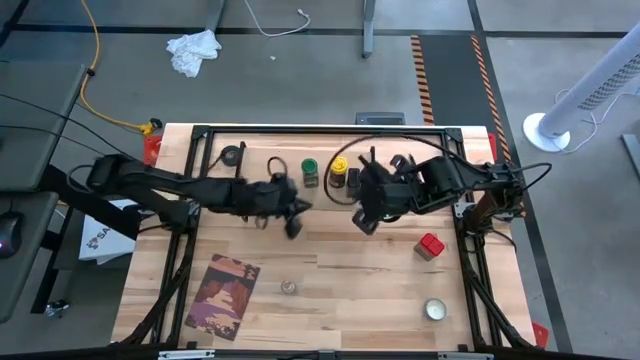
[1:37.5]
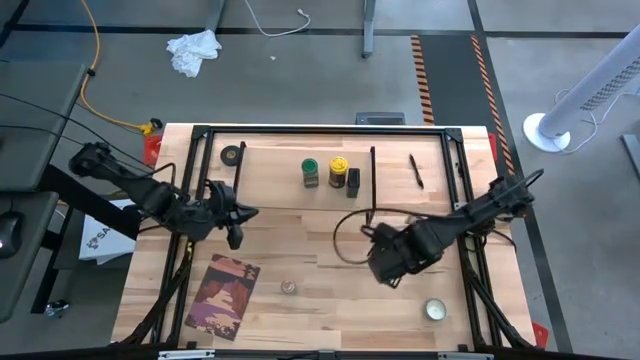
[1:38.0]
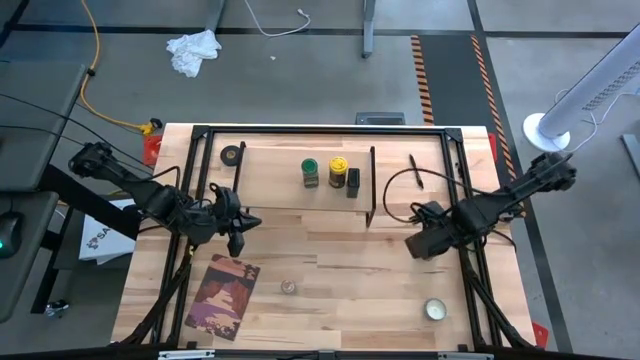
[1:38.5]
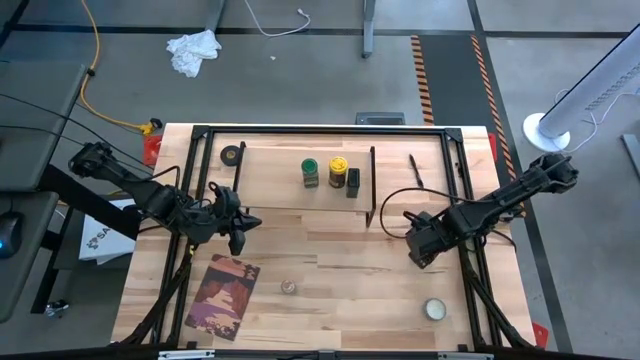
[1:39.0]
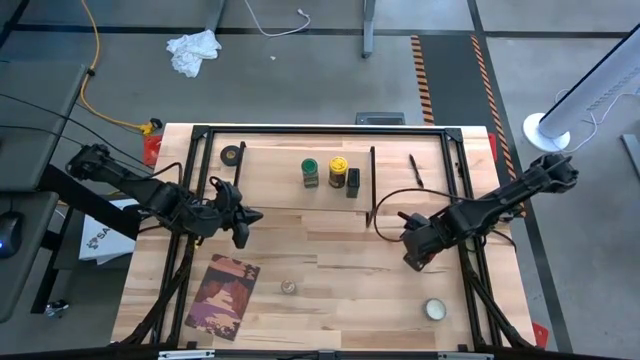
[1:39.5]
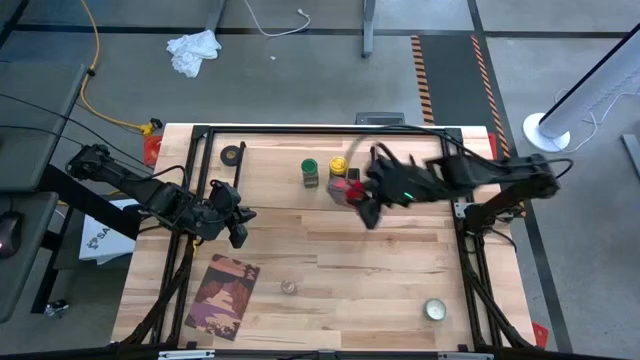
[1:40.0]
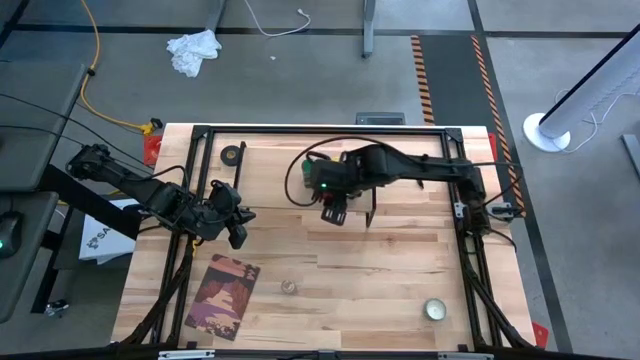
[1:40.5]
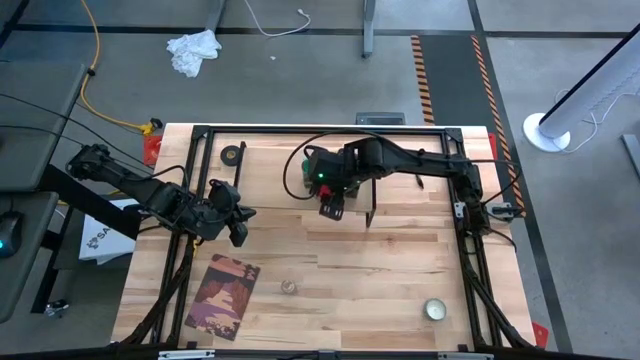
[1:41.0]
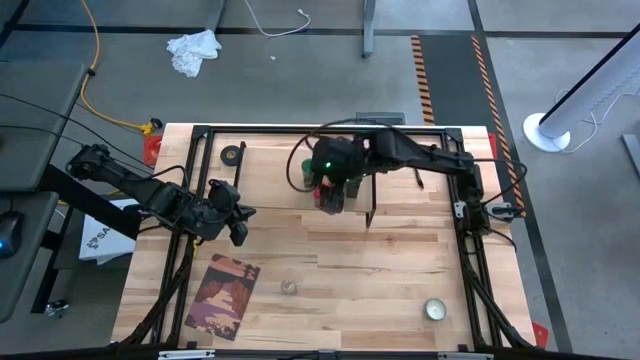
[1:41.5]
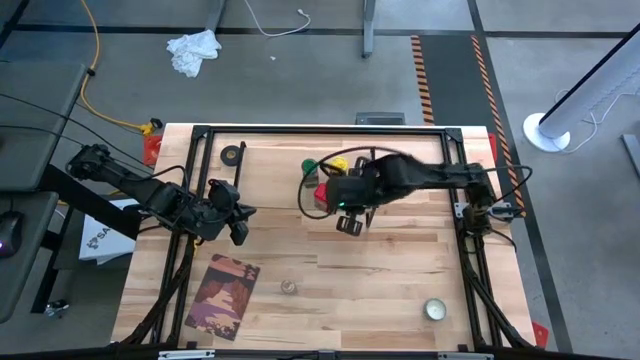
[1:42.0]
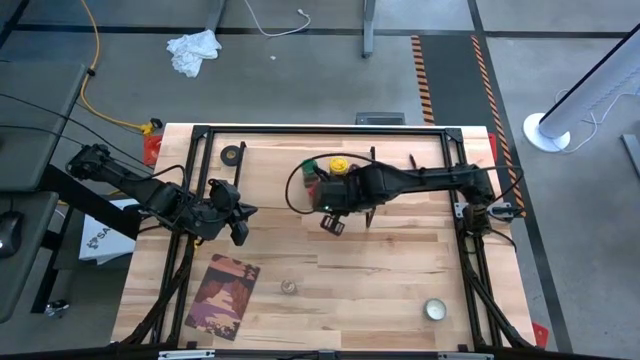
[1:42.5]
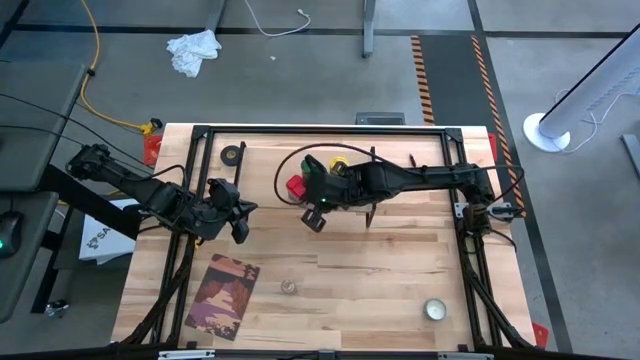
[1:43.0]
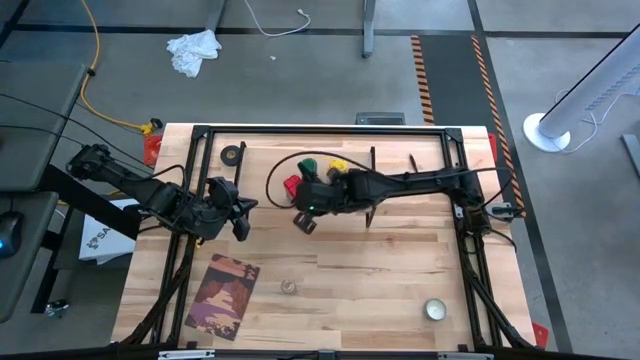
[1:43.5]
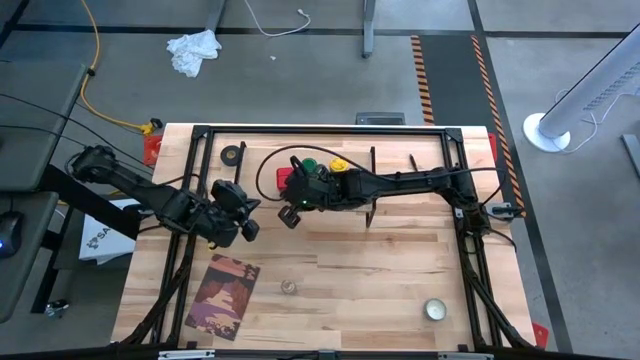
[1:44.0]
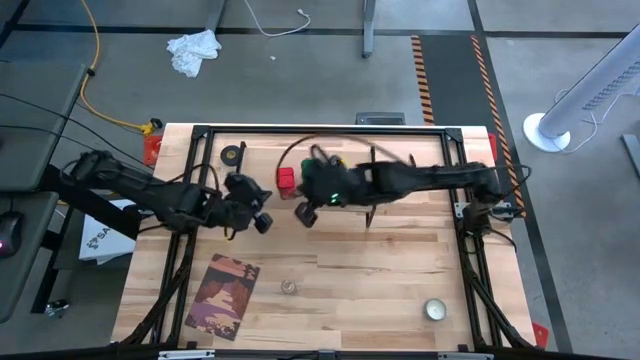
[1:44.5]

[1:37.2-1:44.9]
Task: Shelf spices
Put the red seasoning can on the shelf

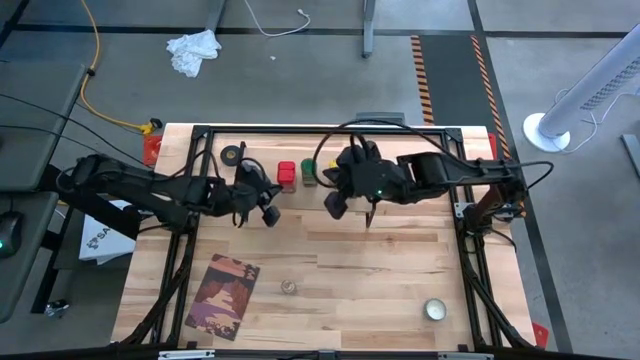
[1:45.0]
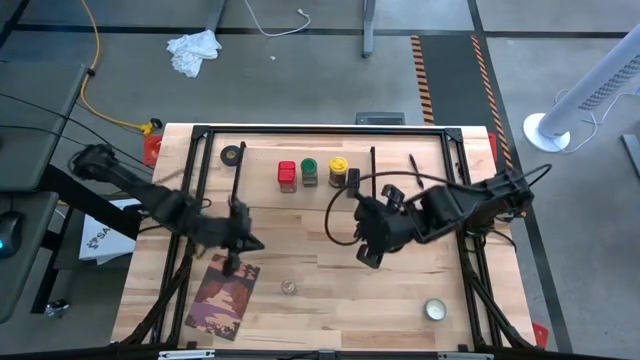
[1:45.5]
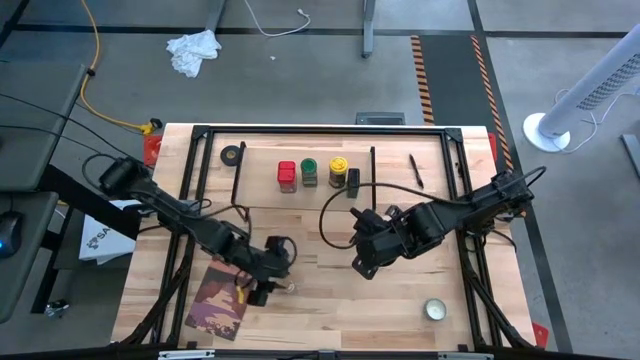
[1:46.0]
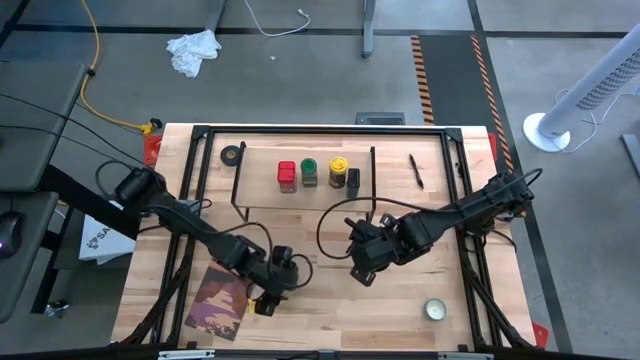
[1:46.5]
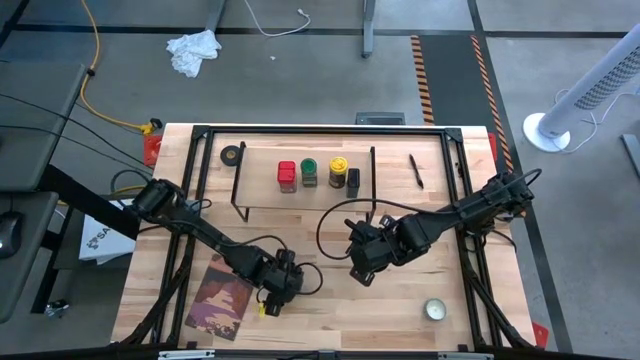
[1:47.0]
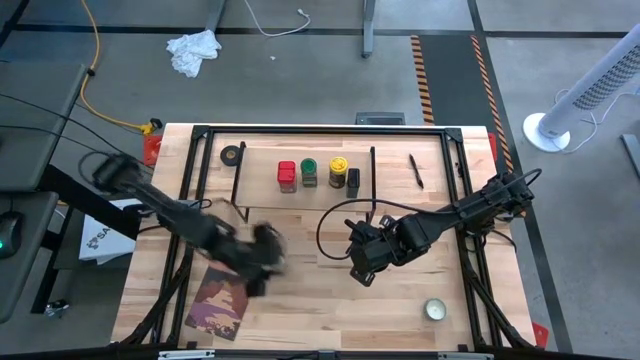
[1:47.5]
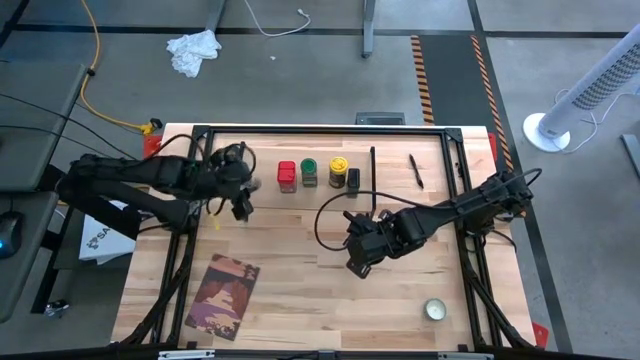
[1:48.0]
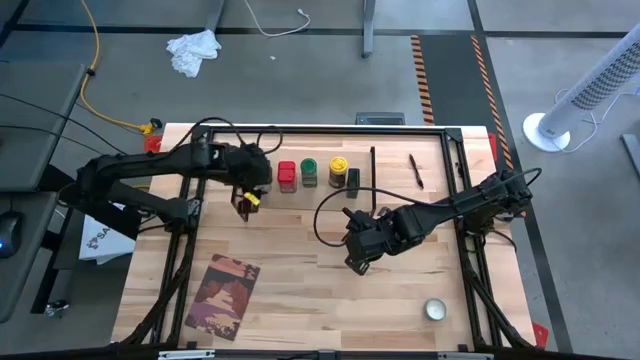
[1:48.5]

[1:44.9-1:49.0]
Put the brown seasoning bottle on the shelf

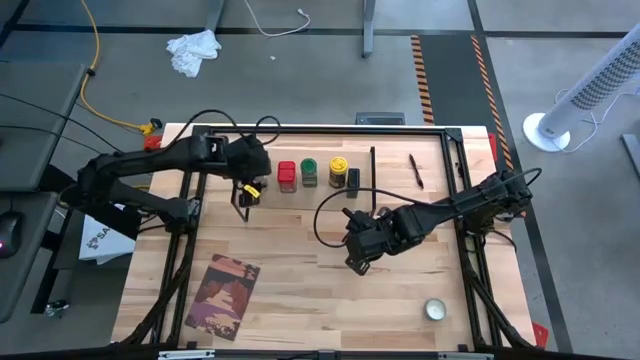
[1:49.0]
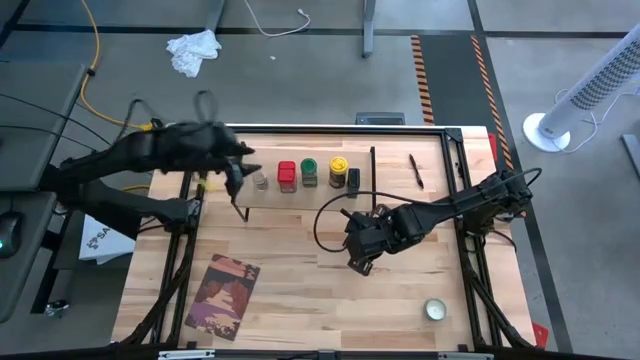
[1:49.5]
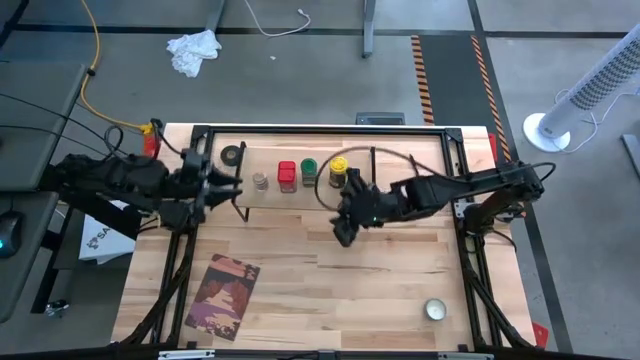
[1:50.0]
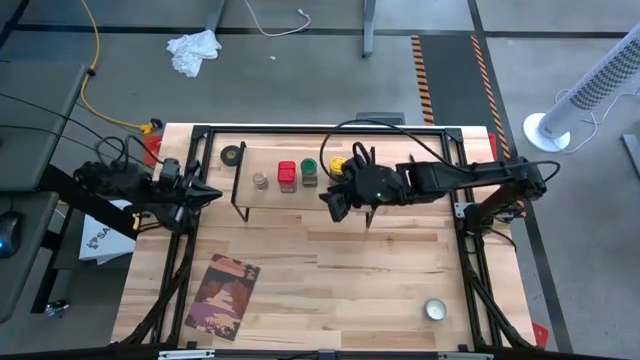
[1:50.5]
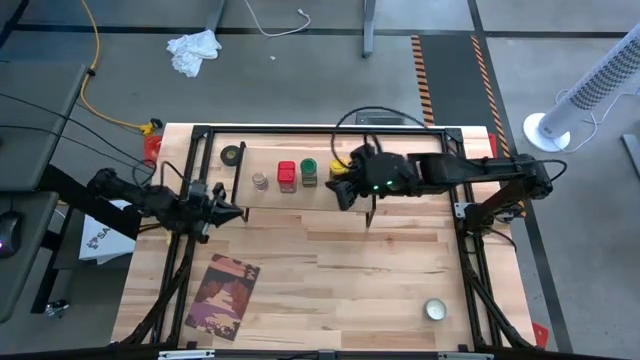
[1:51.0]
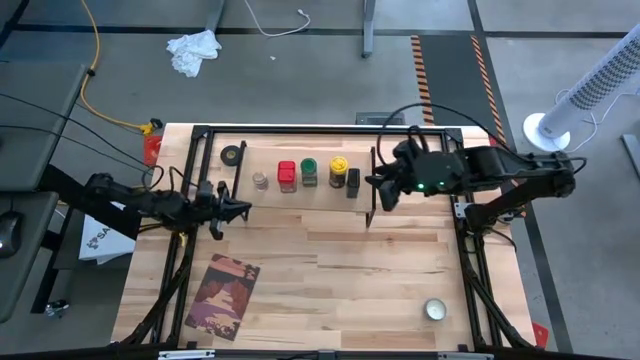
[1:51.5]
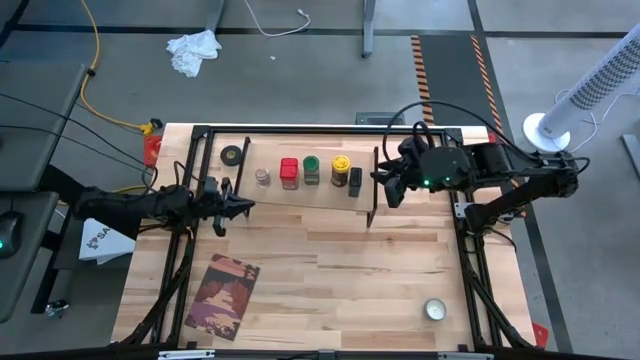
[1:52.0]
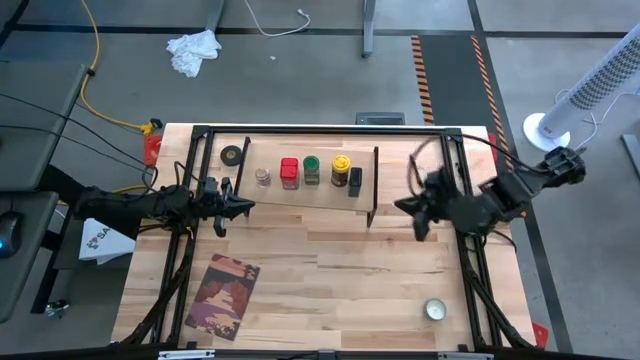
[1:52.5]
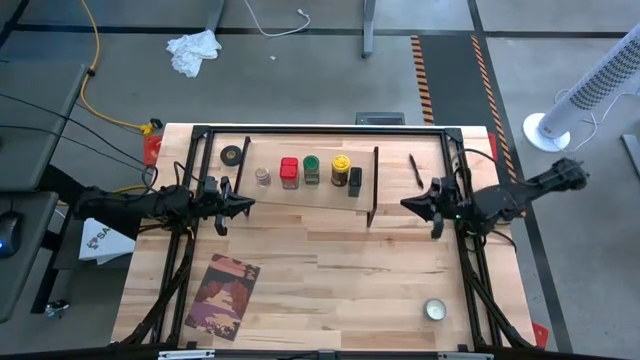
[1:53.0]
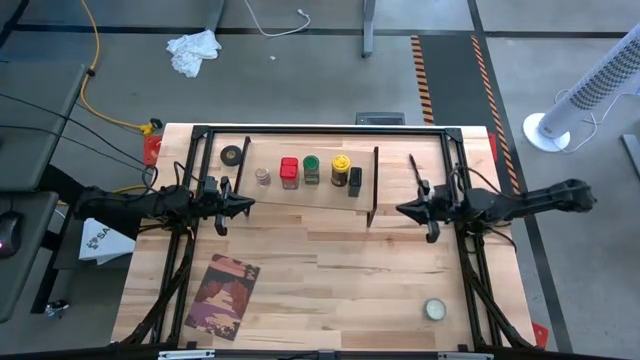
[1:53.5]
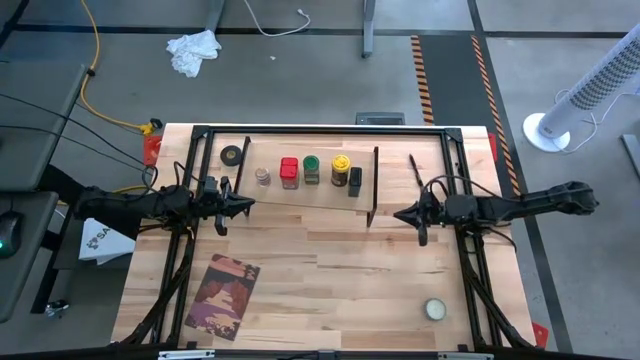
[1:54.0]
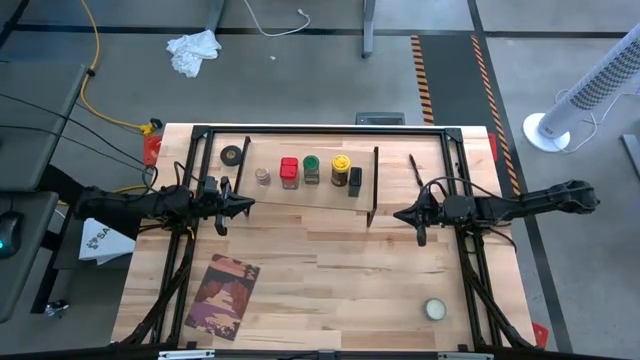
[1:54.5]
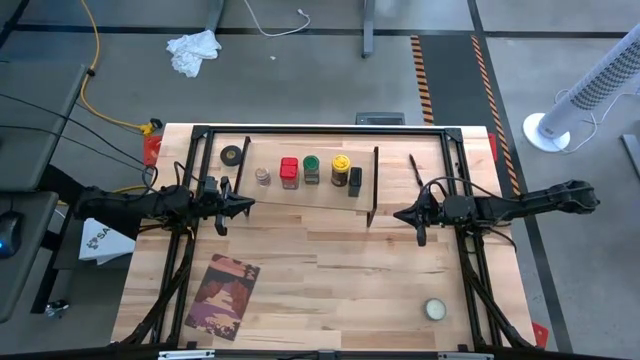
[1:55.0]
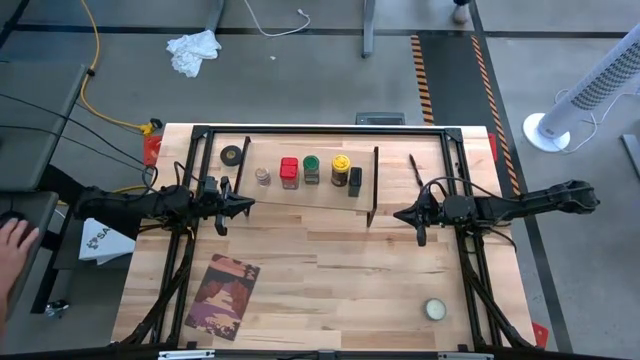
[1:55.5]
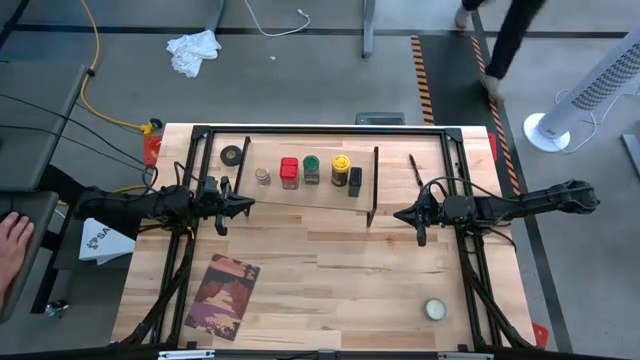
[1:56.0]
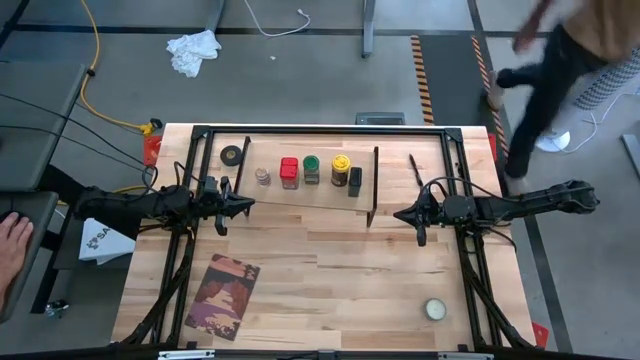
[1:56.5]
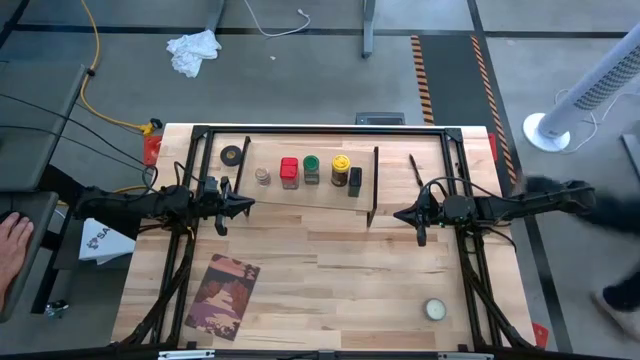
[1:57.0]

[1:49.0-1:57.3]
Return to Home Position

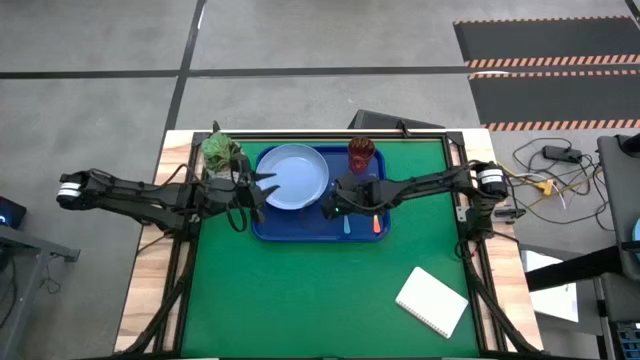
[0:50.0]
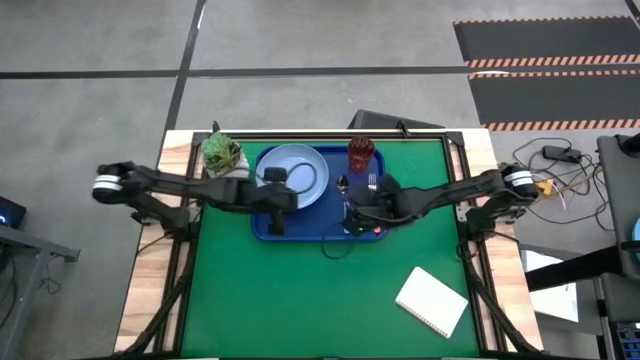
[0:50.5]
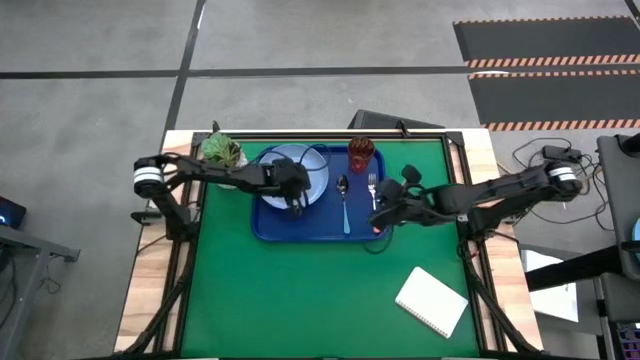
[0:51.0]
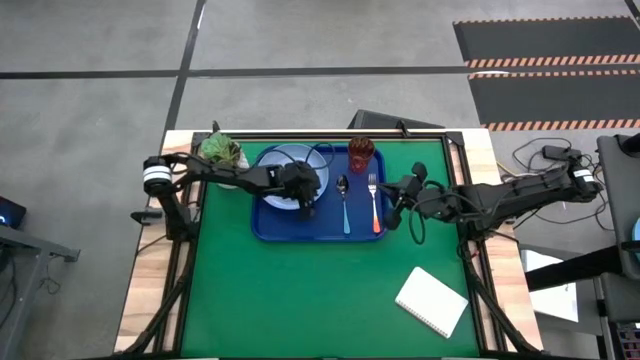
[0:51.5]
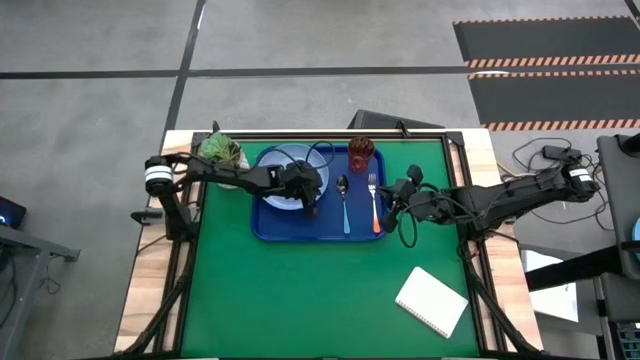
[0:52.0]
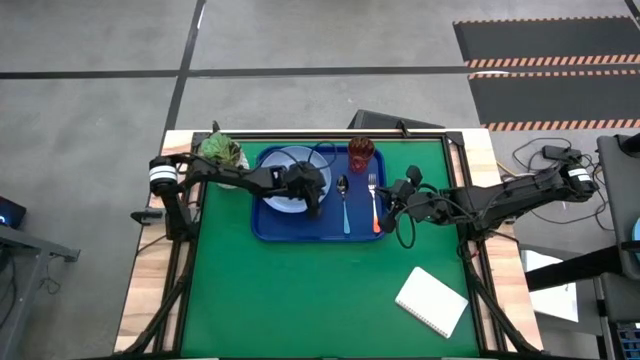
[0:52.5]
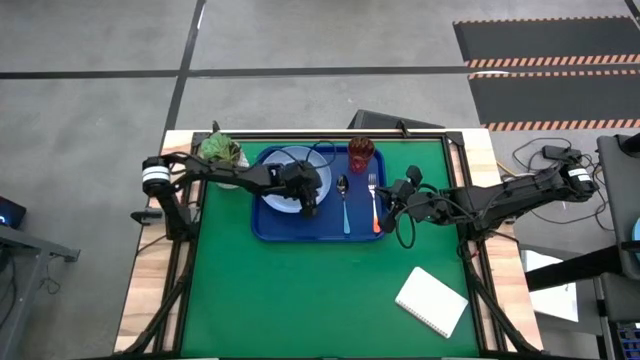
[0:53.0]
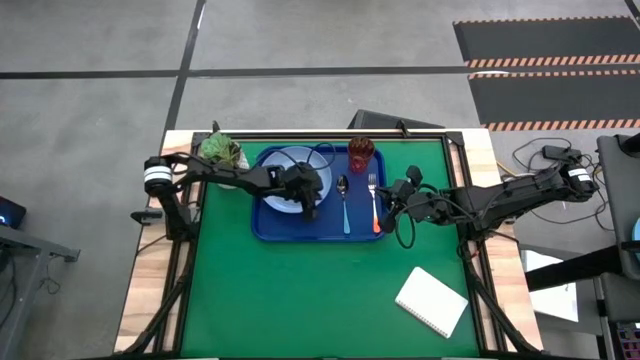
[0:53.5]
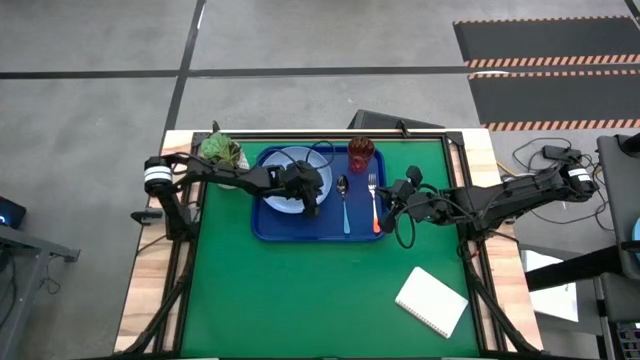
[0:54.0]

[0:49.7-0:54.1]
Task: Pick and place plate/cup/fork/spoon on tray
Adjust the light blue plate
